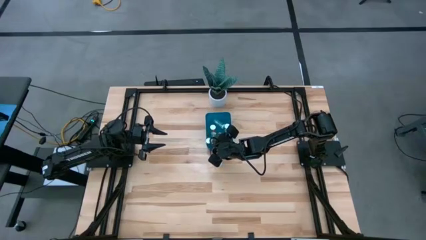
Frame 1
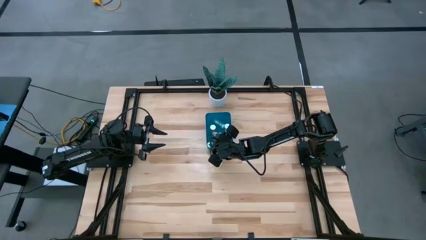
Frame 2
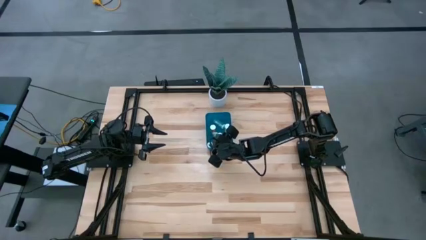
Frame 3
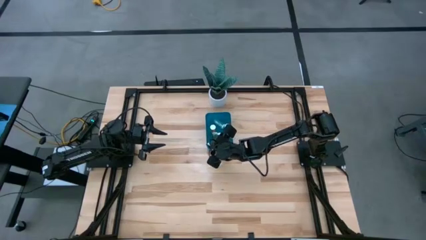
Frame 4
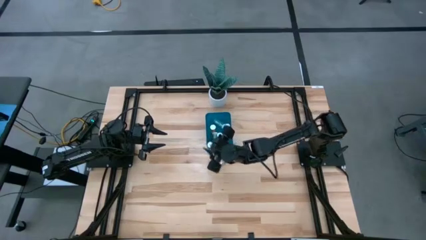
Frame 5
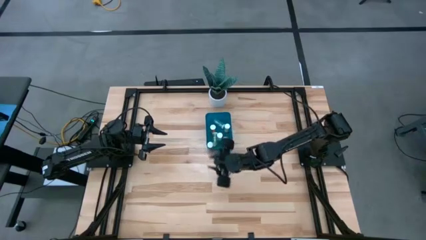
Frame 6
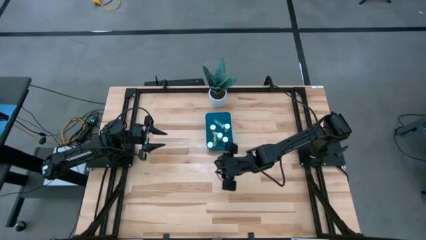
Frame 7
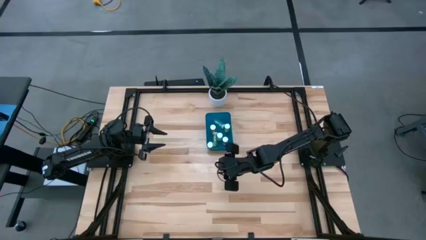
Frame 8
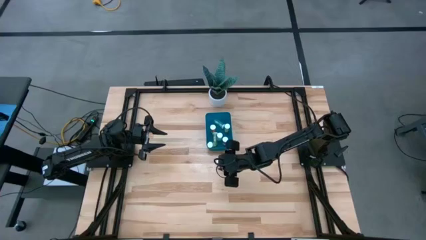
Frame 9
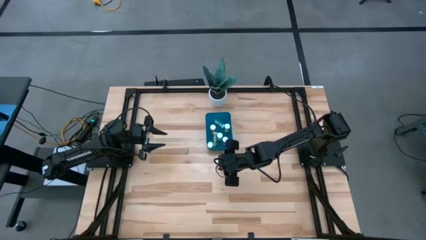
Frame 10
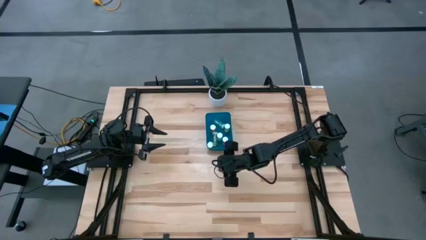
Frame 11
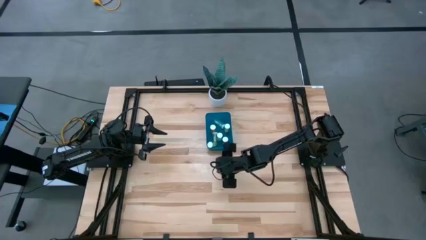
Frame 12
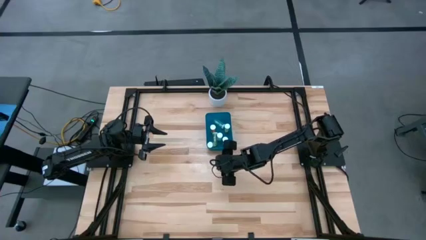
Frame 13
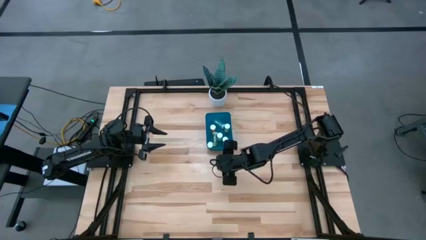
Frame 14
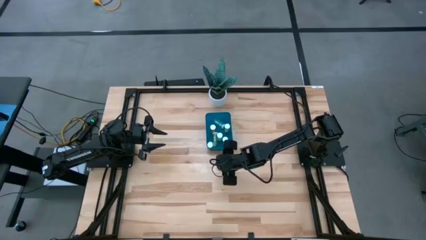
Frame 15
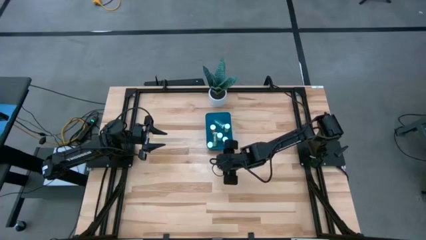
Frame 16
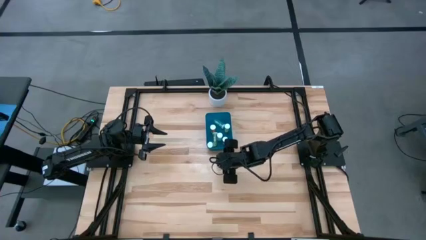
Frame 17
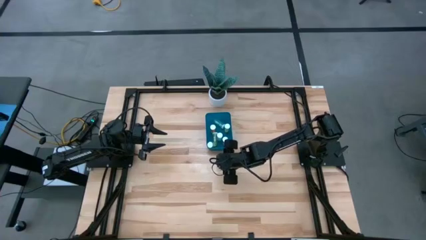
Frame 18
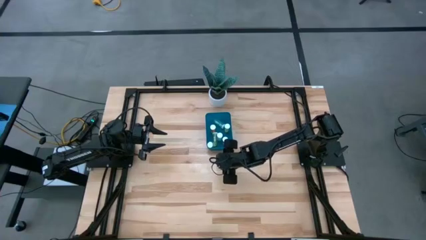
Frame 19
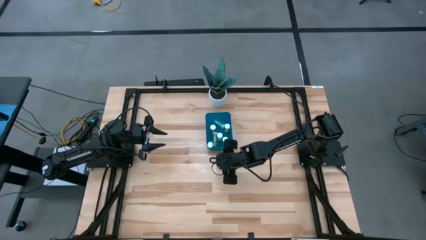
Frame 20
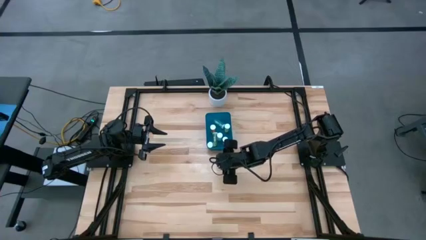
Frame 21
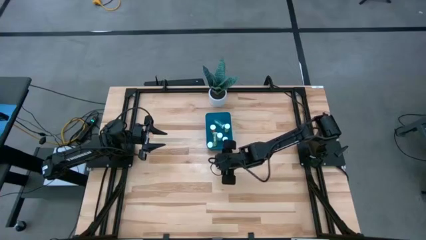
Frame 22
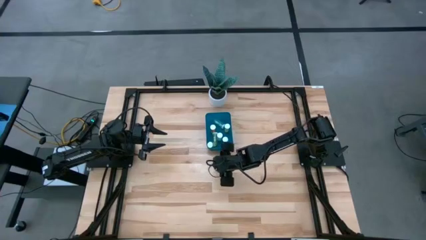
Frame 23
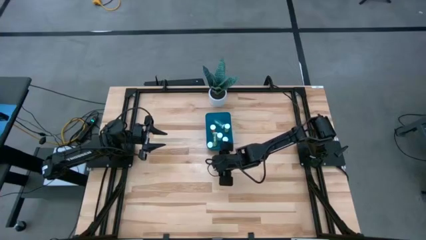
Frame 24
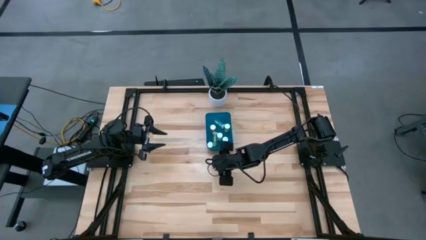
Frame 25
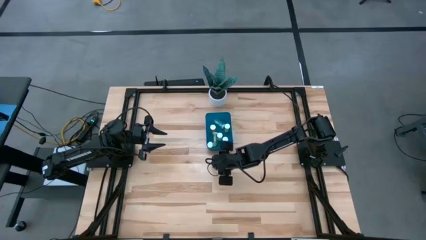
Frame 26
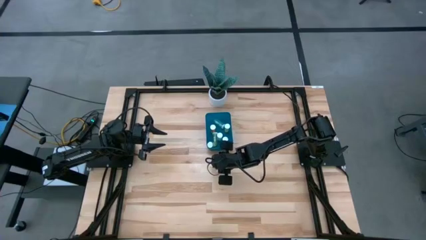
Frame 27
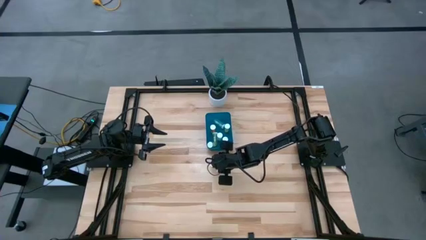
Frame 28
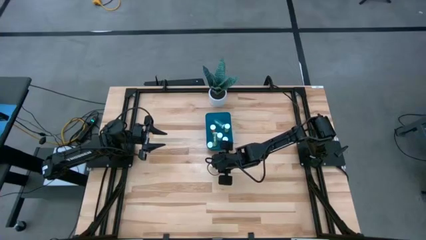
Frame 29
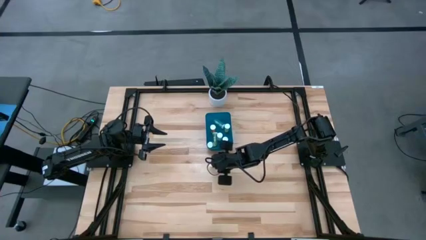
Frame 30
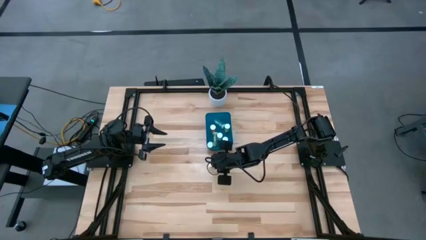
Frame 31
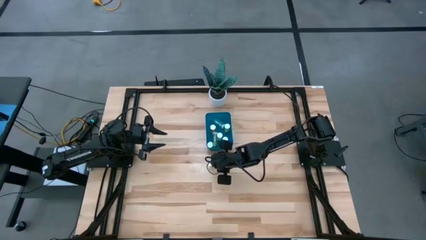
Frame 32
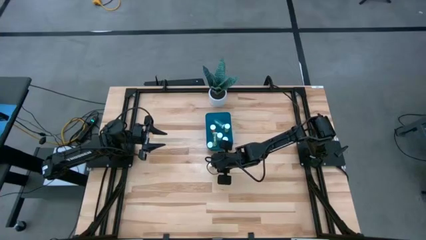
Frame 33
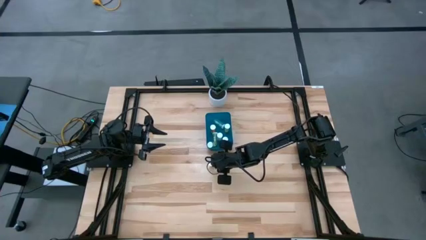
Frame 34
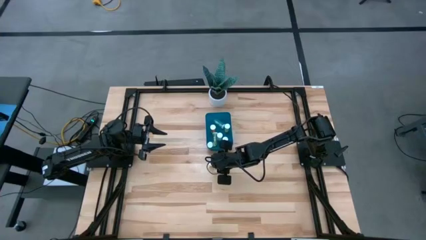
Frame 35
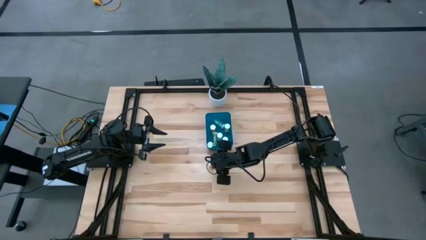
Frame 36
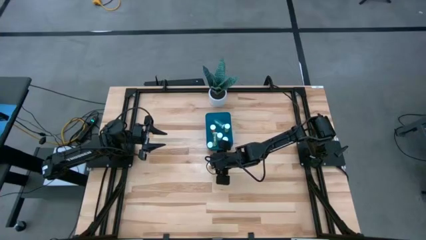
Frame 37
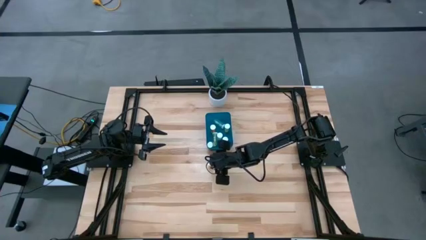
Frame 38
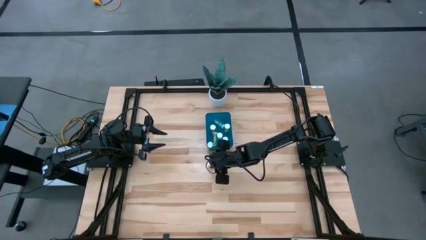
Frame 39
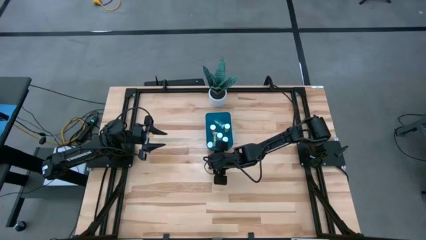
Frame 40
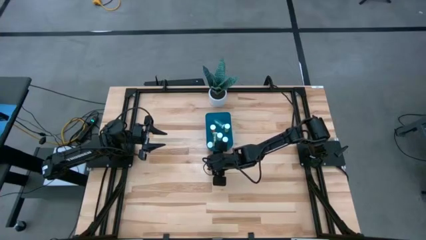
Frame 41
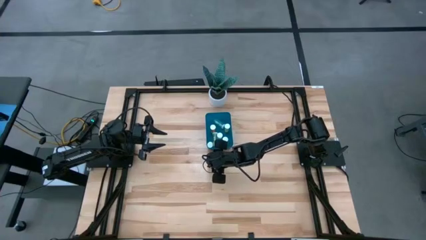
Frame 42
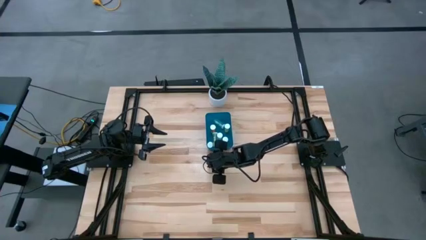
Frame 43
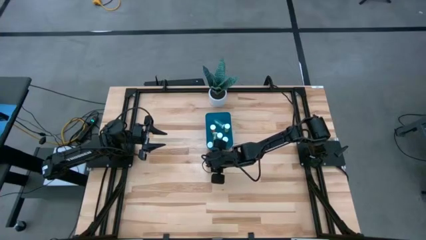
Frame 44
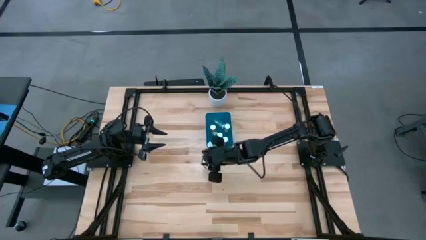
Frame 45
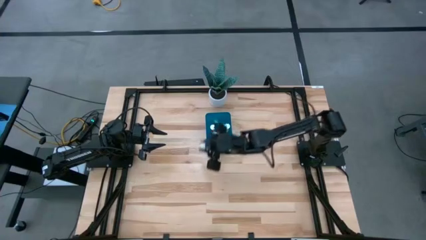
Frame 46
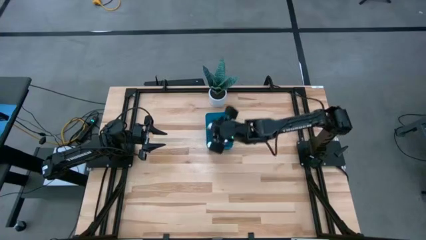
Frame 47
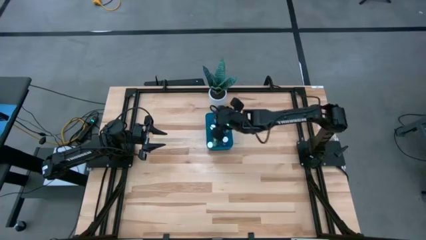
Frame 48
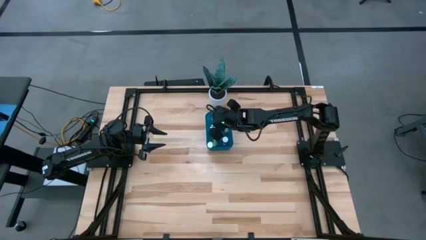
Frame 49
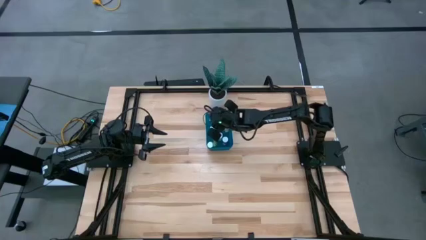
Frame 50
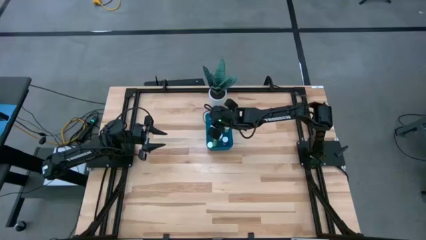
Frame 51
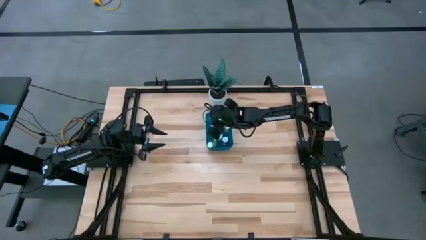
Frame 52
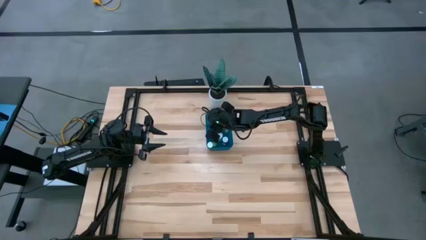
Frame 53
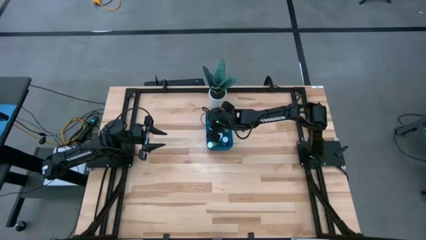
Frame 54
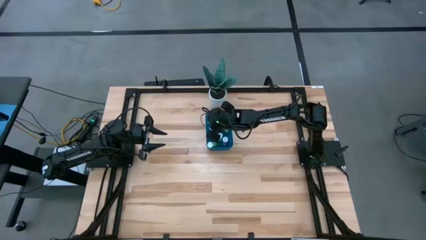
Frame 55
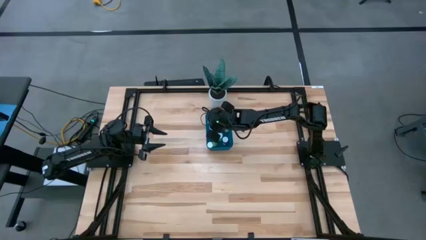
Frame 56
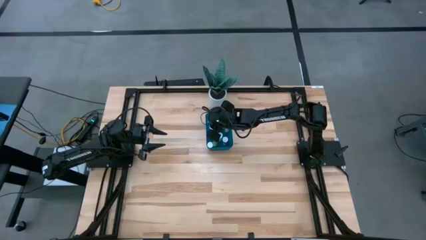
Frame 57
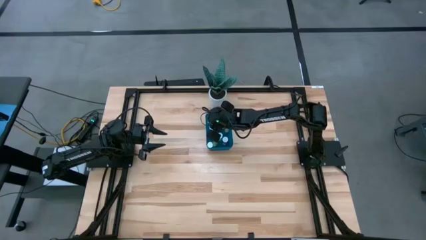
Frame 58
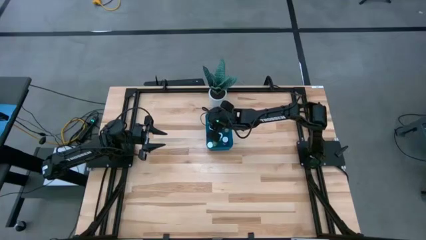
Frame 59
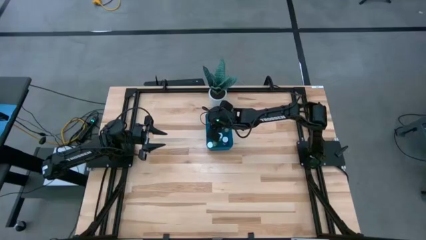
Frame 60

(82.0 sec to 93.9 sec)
Task: Pick and place pill bottles into a basket
Put the yellow pill bottle into the bin

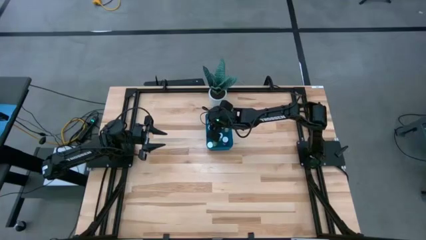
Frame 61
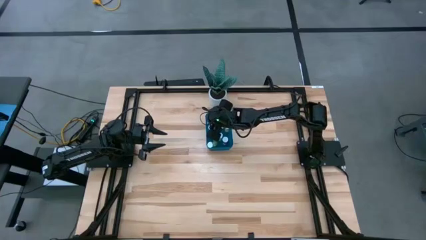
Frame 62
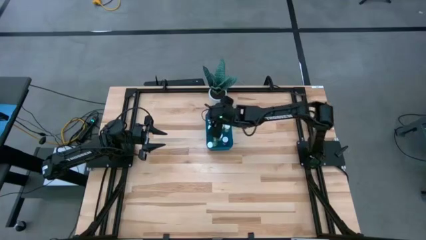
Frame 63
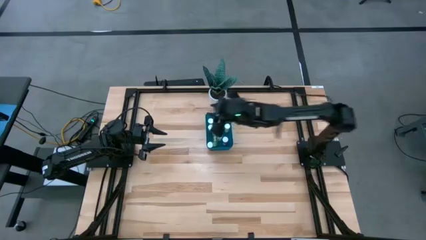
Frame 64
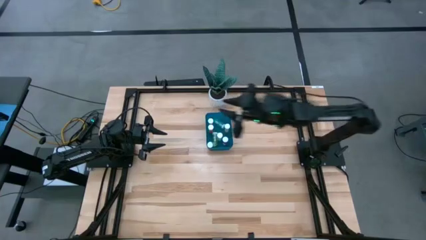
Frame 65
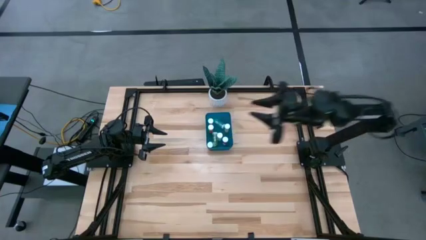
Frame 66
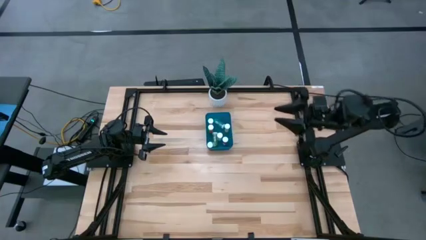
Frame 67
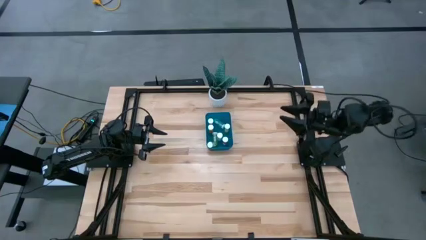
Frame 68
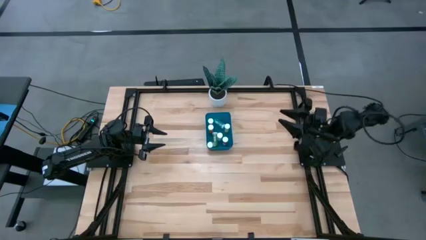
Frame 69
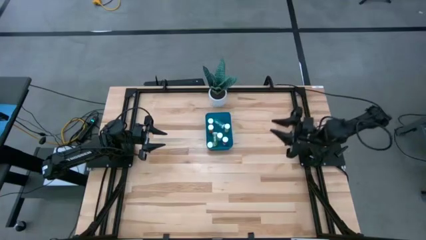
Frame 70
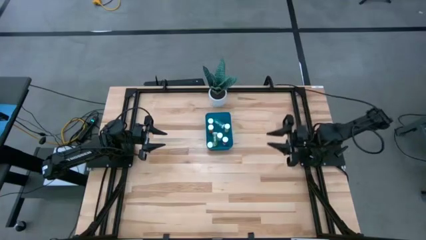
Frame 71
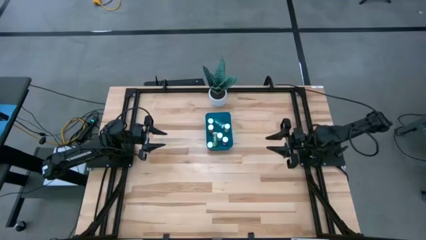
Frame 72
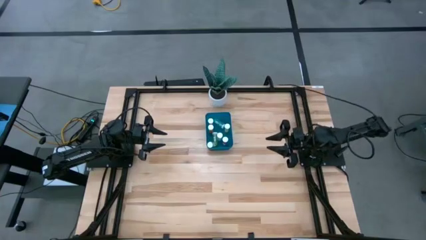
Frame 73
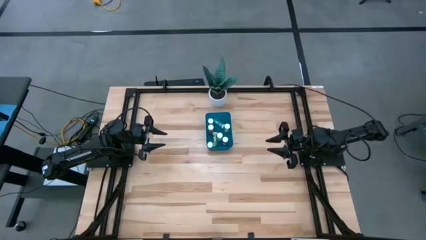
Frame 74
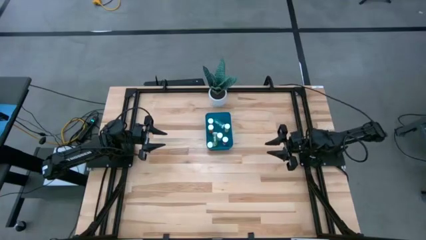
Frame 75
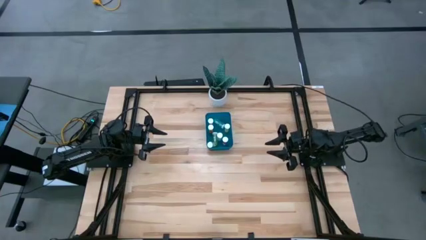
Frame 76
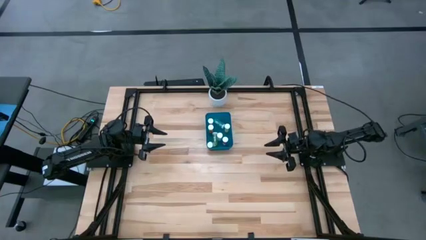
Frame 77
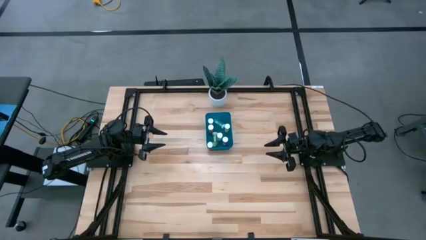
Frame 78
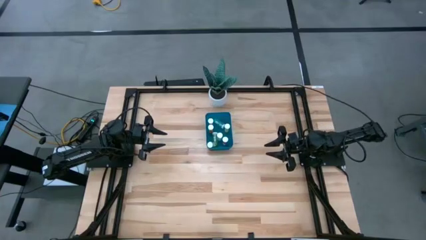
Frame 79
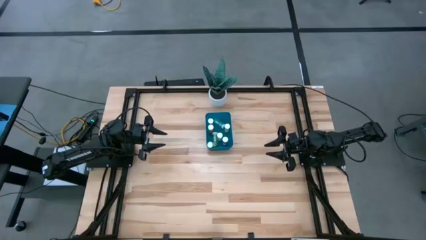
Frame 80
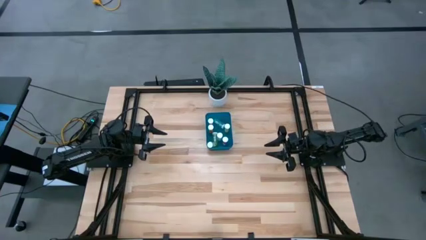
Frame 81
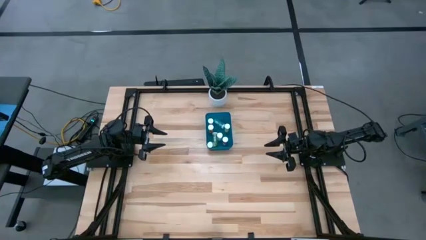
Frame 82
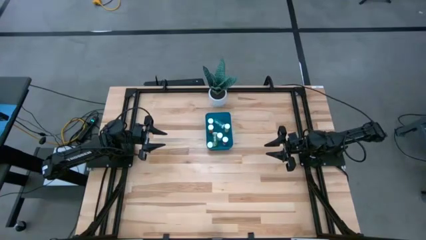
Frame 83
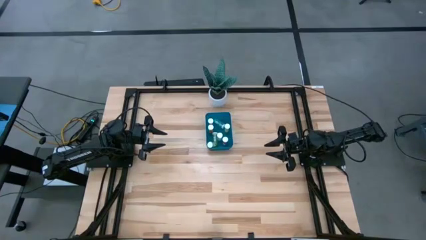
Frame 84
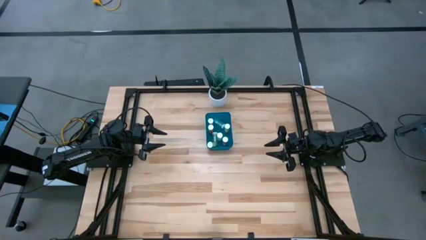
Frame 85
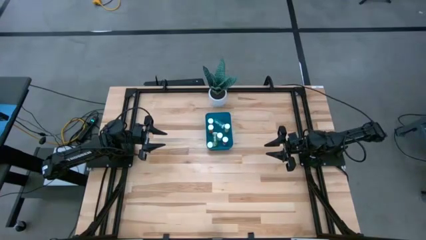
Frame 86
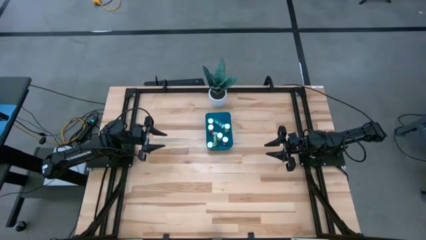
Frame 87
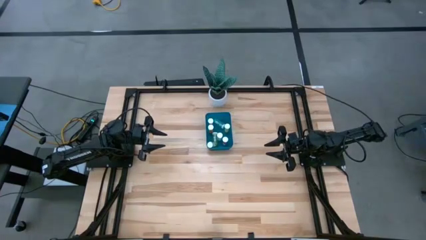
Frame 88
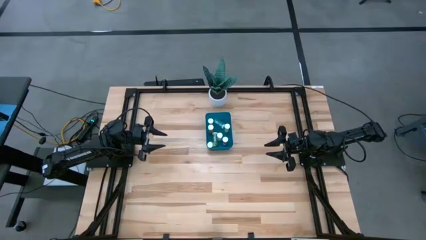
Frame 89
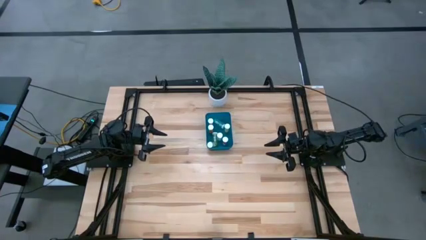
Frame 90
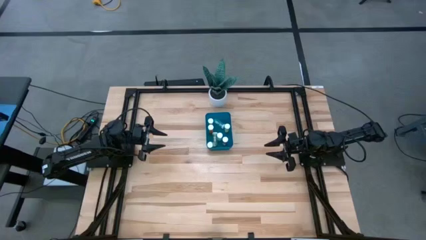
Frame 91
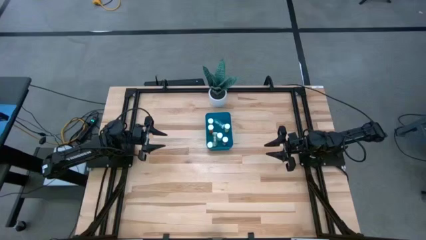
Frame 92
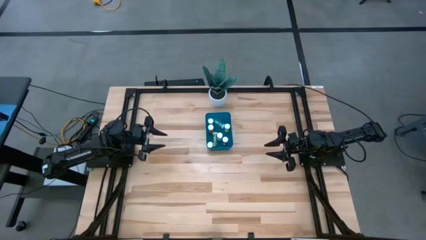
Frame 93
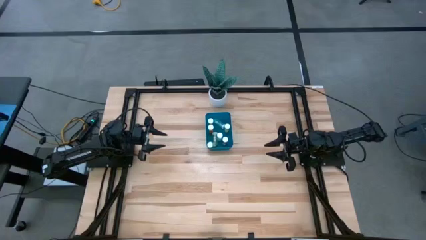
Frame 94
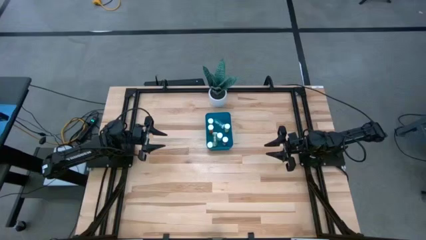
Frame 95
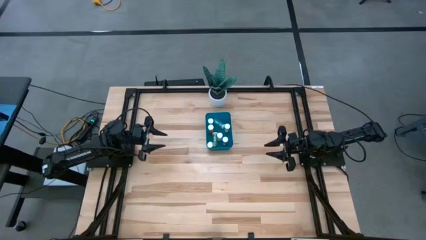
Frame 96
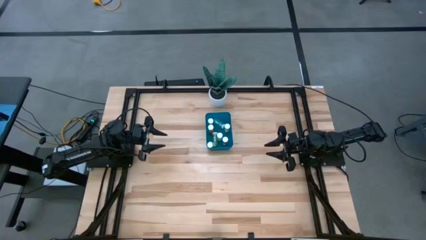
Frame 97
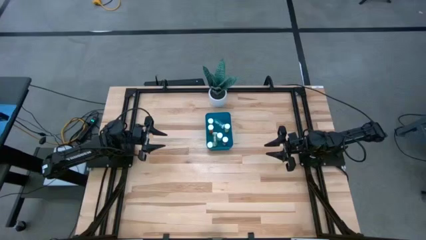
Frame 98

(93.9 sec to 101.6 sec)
Return to Home Position
